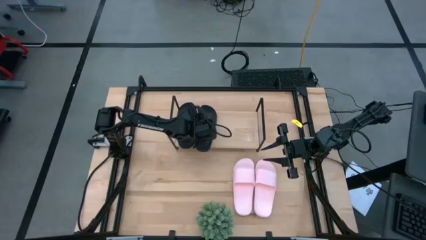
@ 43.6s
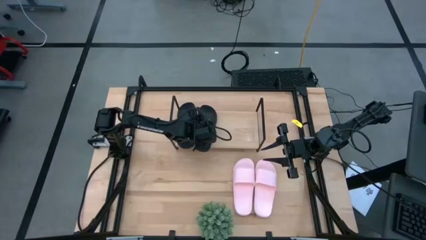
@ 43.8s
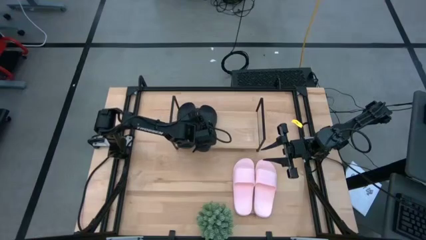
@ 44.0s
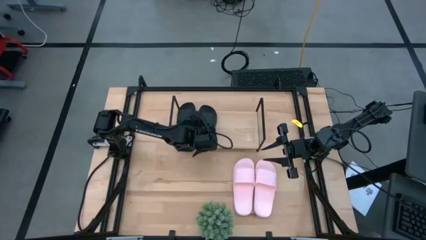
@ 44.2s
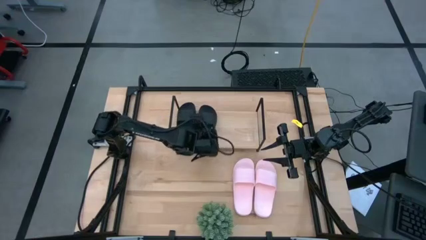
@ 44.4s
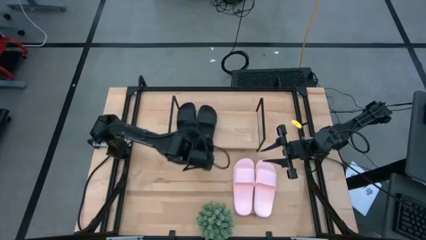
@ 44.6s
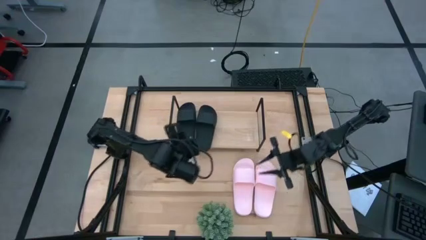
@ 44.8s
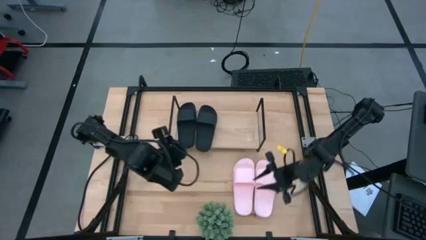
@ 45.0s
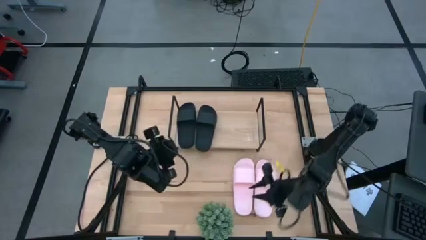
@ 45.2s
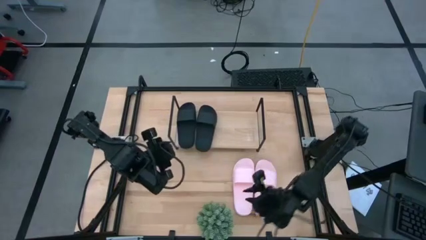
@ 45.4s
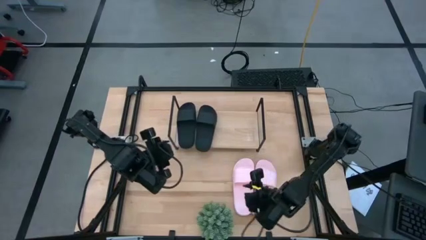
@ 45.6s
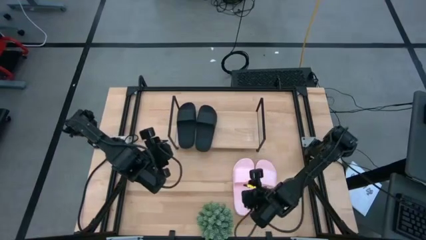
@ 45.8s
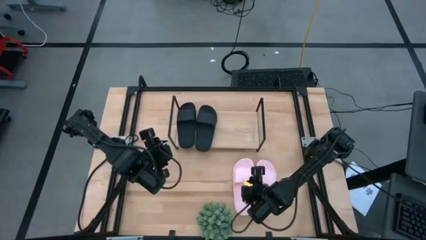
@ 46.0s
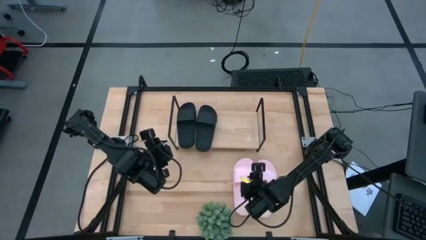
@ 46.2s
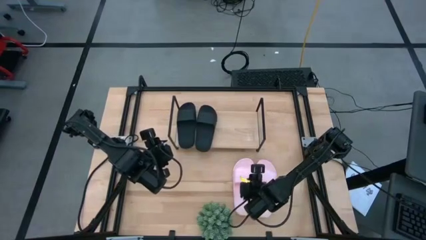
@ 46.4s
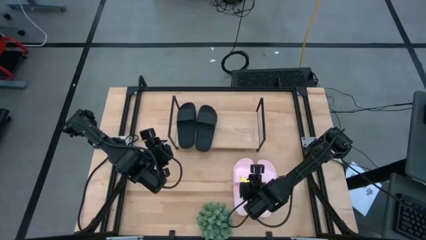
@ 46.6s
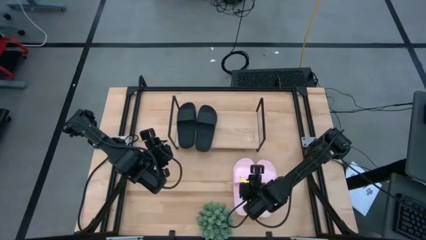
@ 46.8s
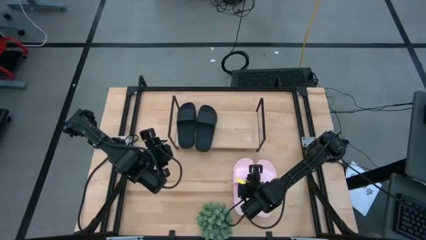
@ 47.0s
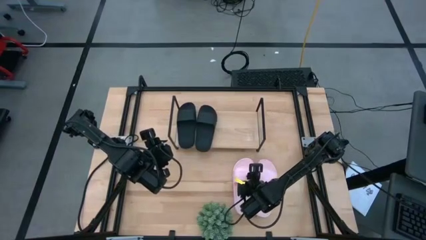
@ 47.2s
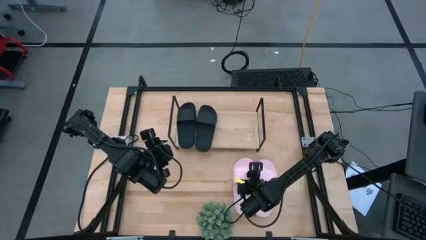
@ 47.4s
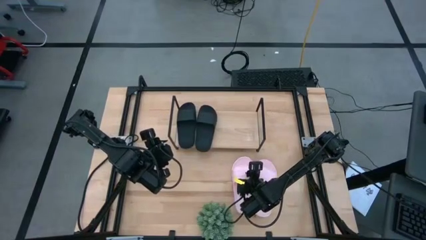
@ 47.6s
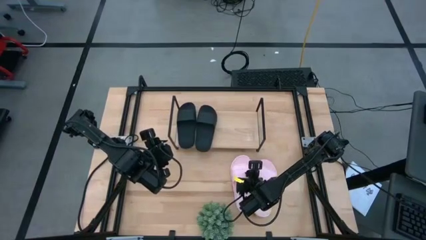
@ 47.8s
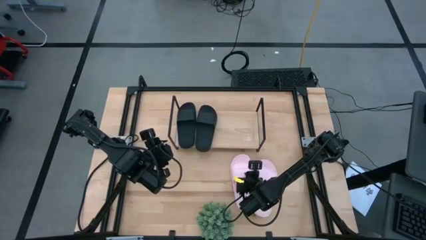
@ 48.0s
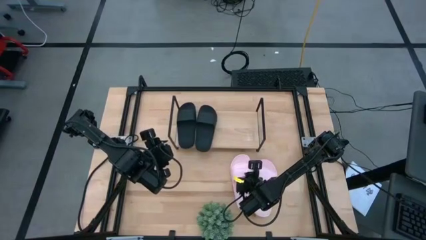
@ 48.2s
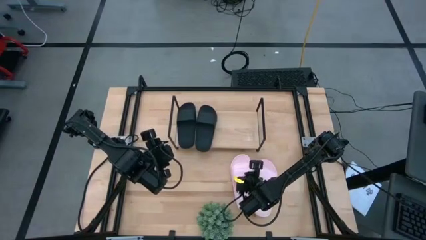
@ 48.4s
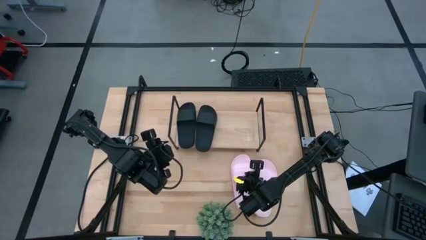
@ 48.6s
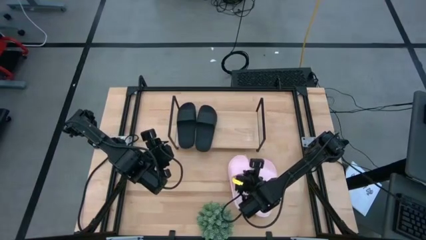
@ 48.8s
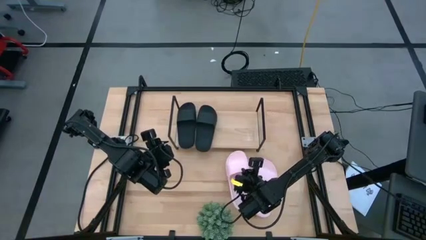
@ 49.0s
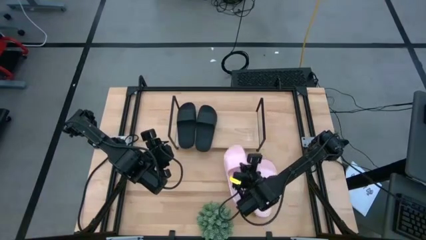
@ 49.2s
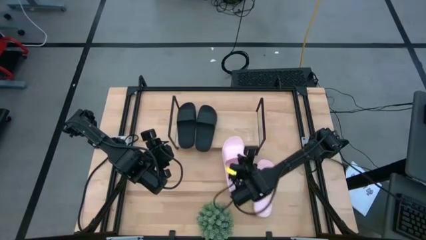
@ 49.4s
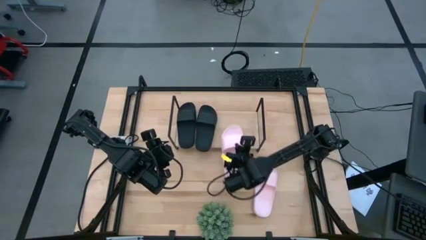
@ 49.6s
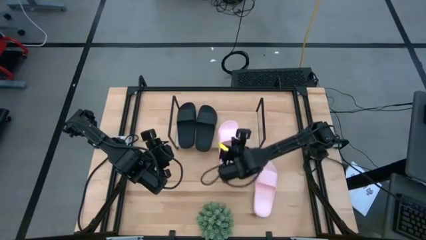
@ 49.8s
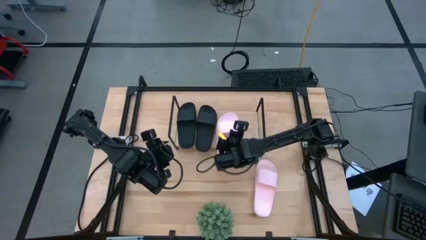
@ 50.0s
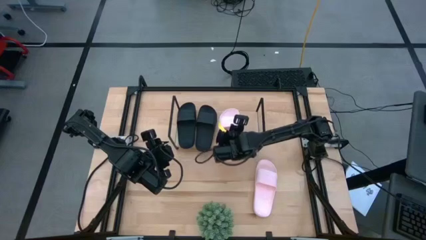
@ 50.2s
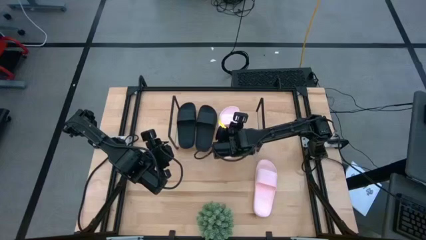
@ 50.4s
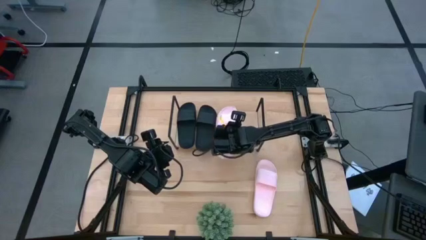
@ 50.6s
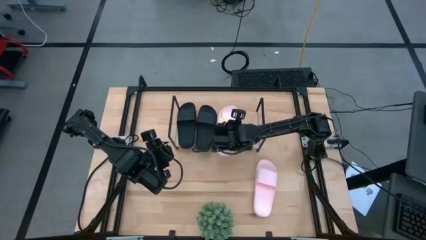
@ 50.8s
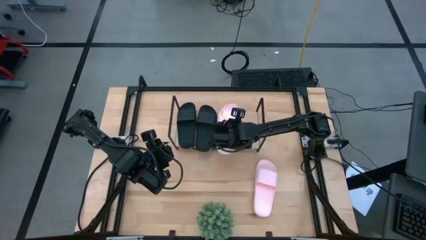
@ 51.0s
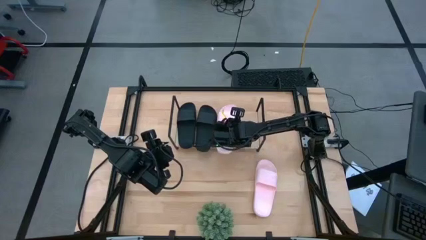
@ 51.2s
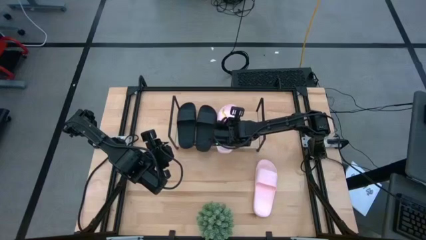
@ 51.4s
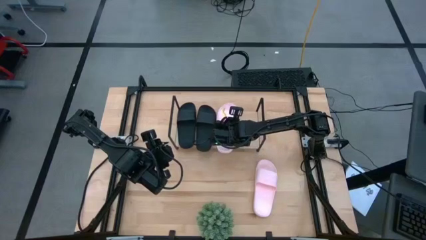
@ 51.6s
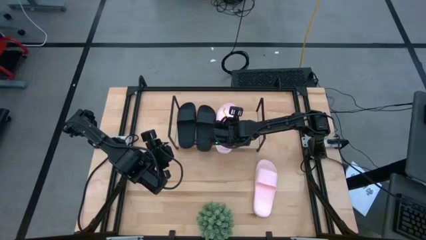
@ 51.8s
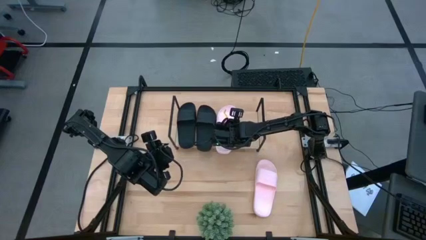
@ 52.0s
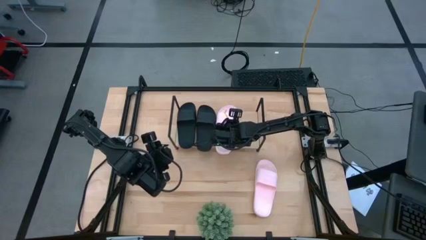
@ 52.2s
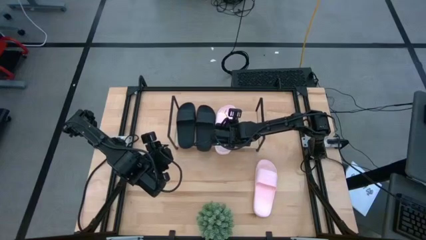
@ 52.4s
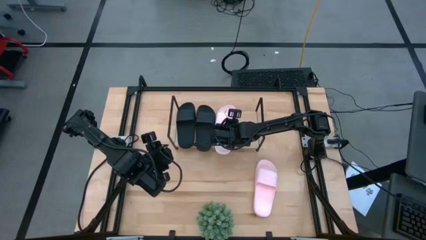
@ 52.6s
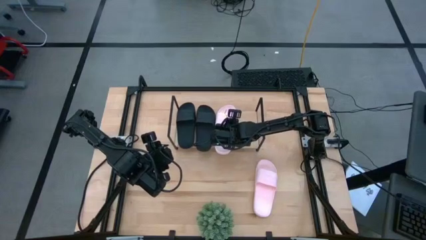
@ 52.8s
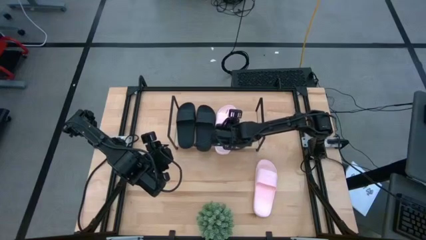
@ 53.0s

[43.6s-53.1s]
Task: Pick and place slides into the shelf
Put the left pink slide on the shelf

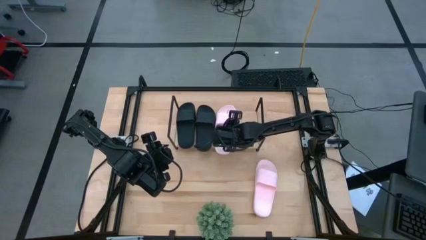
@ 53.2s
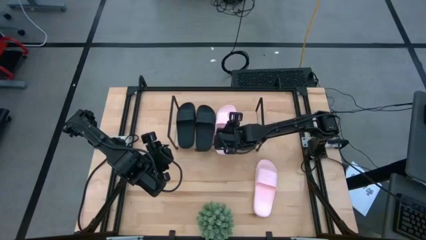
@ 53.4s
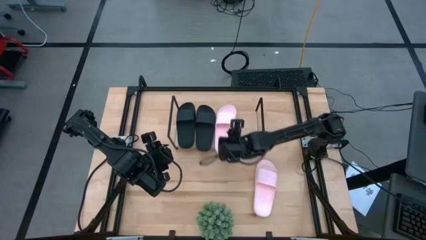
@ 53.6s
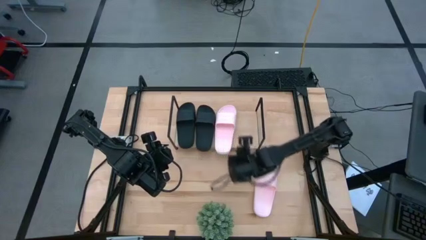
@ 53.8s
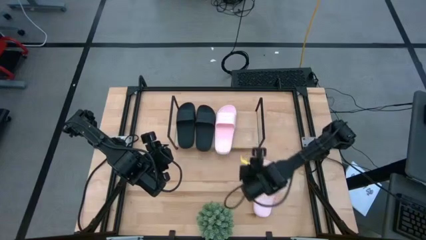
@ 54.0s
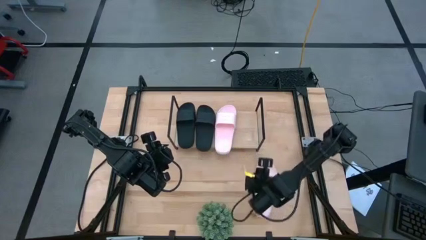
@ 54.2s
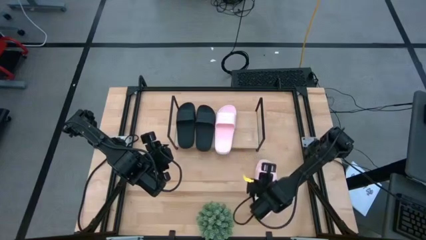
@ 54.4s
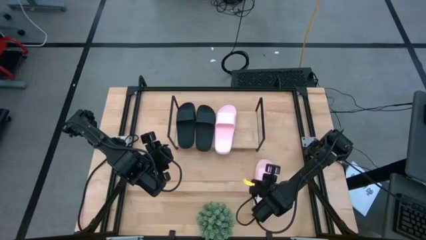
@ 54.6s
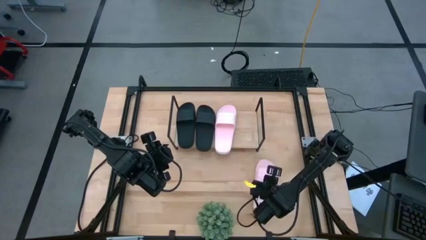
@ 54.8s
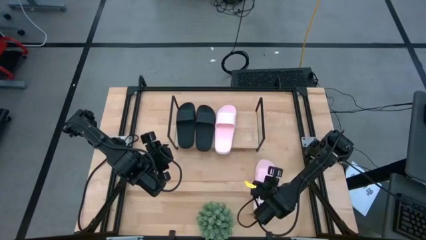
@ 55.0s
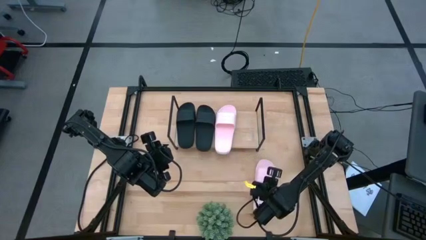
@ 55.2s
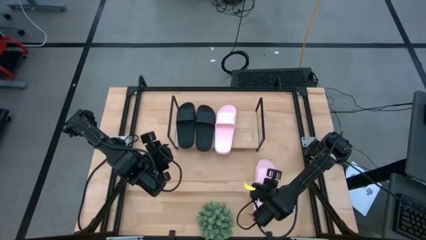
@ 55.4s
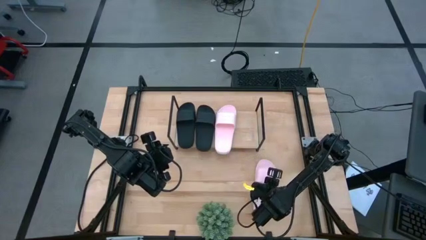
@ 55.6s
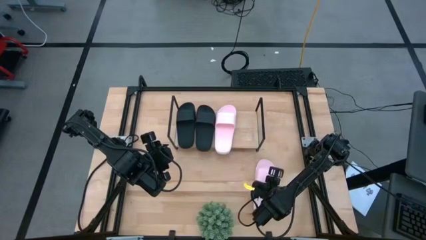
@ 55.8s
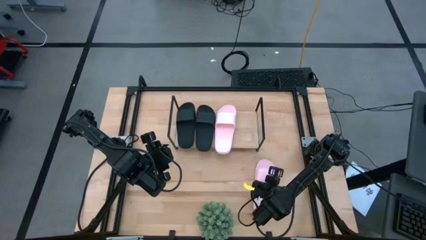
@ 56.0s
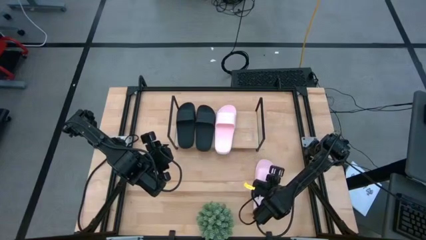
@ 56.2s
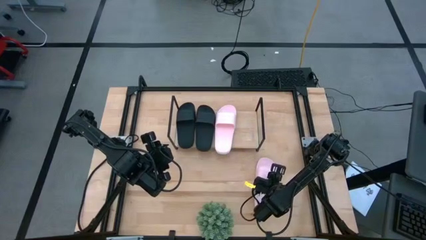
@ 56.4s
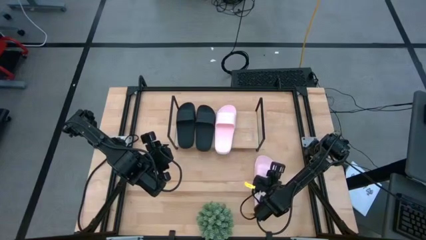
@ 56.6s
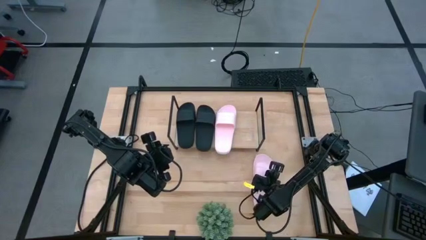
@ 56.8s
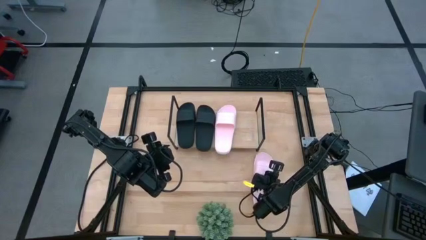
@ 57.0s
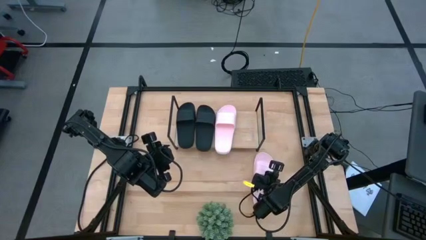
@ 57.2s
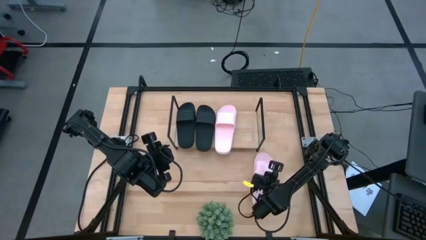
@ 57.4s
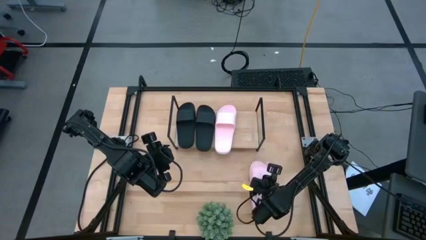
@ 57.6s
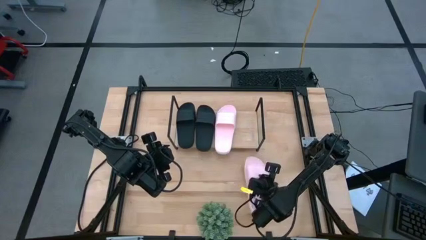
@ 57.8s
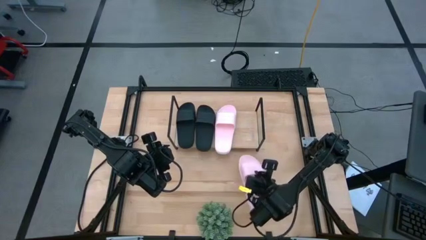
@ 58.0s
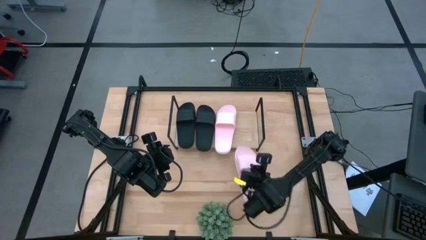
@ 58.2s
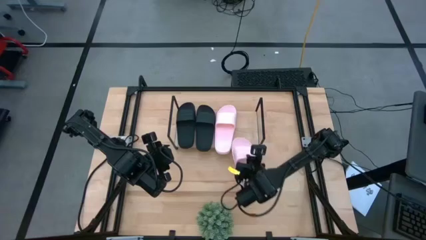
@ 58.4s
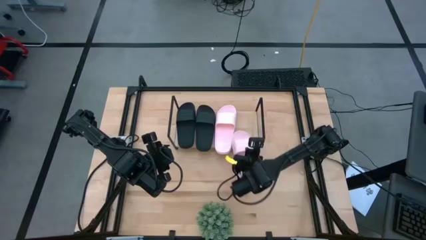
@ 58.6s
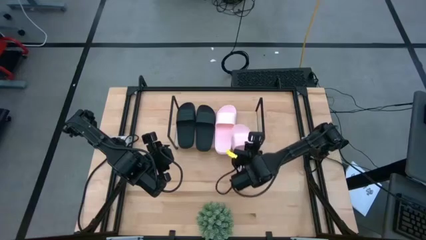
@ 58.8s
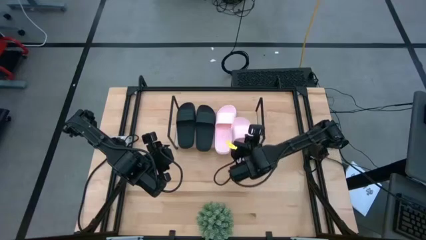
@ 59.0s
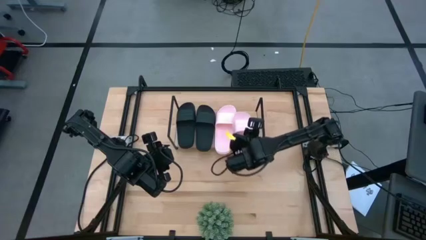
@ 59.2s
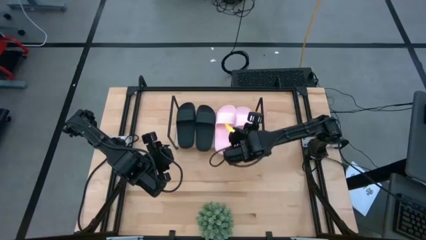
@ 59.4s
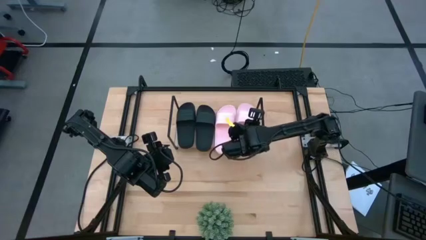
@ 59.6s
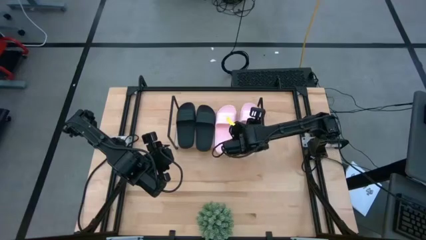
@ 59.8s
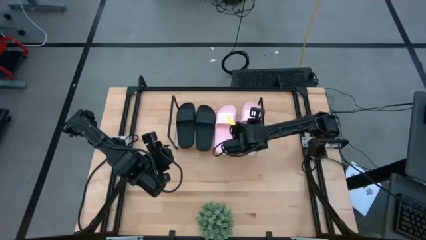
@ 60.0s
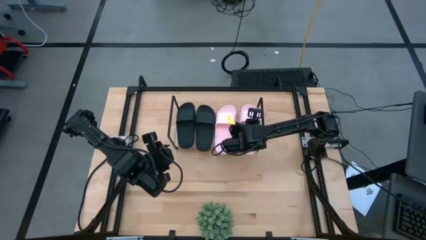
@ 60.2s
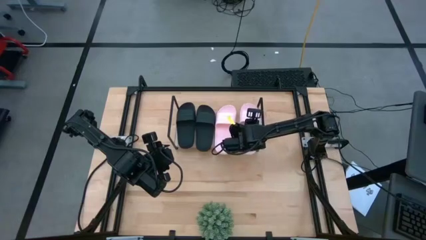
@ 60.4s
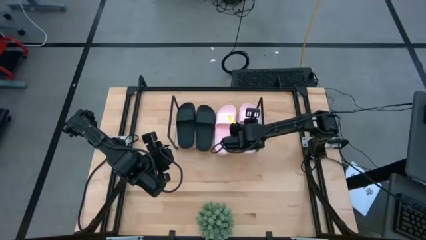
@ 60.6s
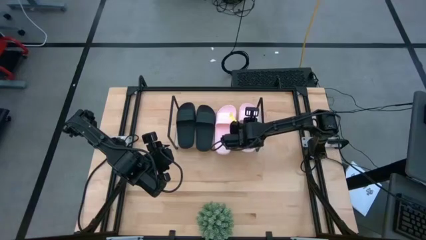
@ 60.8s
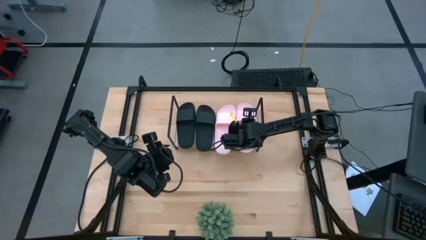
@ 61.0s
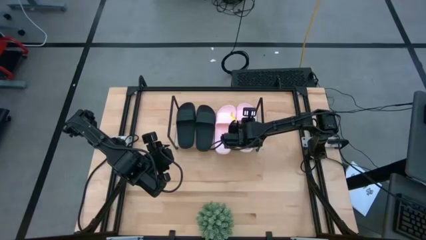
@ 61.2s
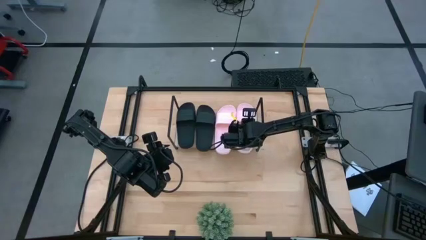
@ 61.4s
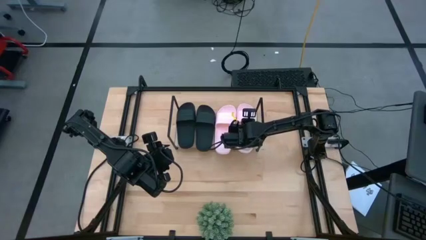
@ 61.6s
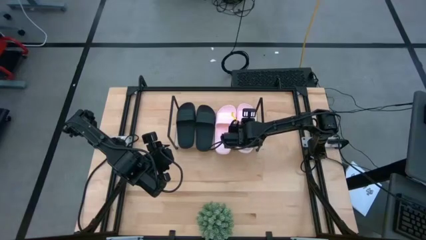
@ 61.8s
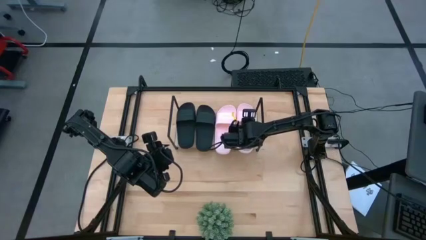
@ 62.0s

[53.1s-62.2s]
Put the pink slide on the shelf
